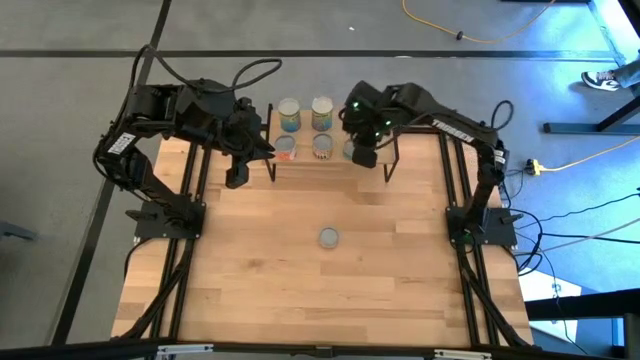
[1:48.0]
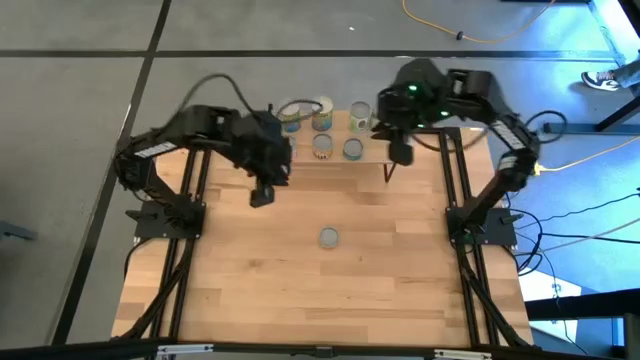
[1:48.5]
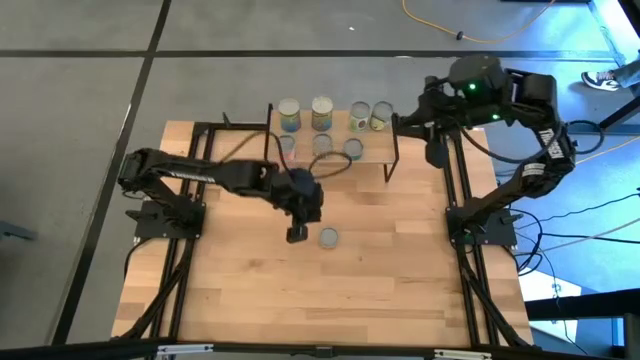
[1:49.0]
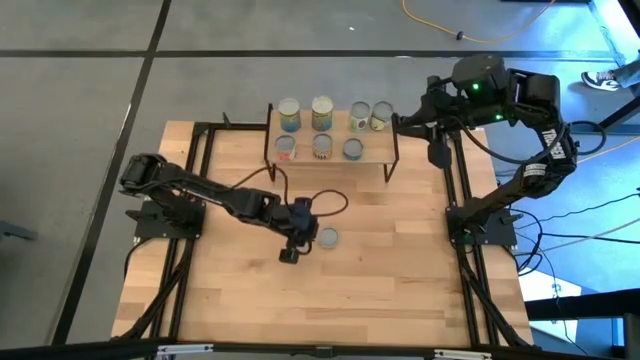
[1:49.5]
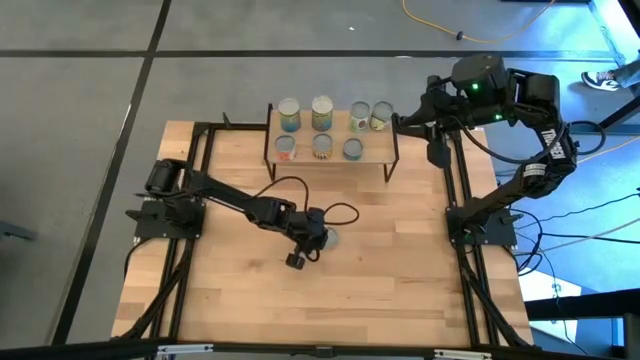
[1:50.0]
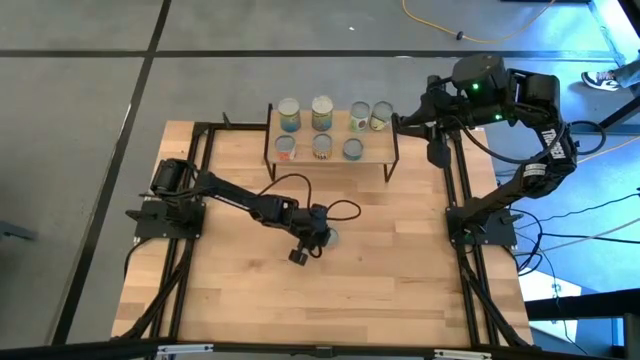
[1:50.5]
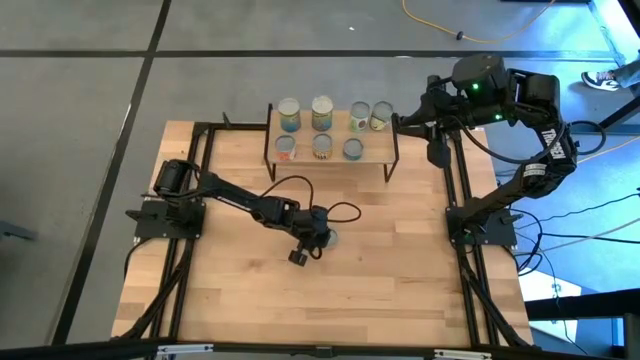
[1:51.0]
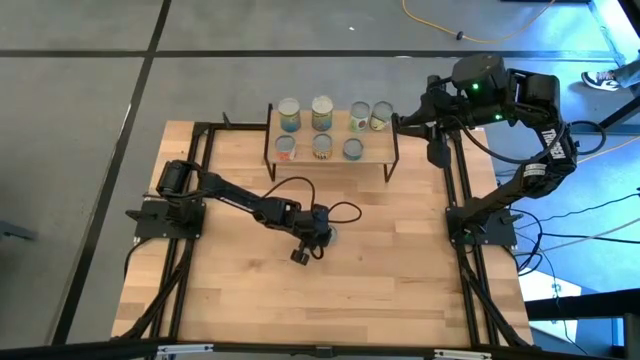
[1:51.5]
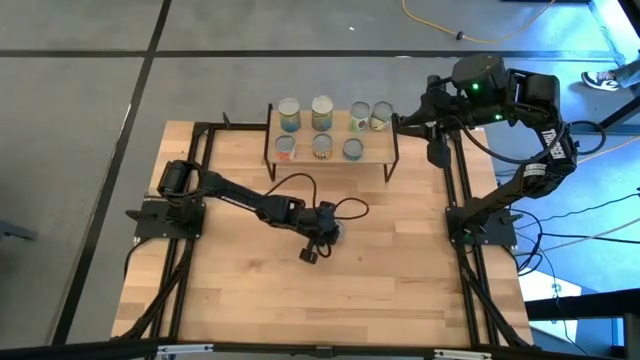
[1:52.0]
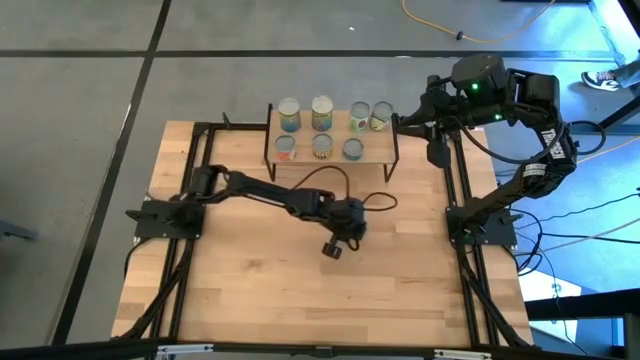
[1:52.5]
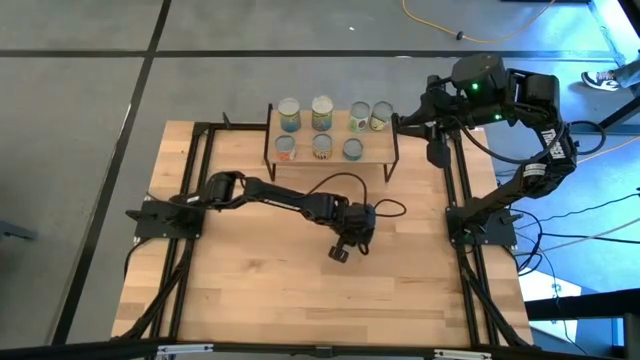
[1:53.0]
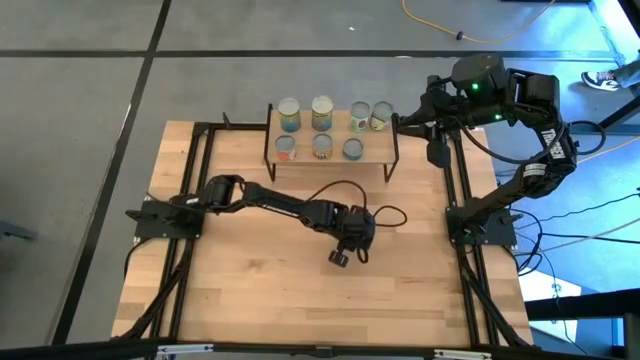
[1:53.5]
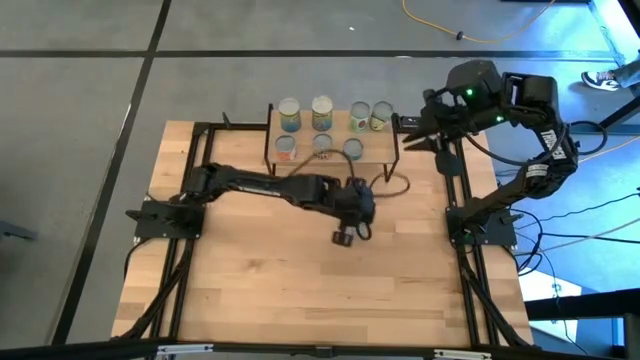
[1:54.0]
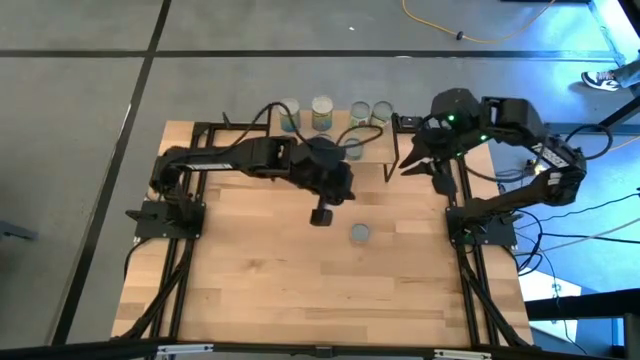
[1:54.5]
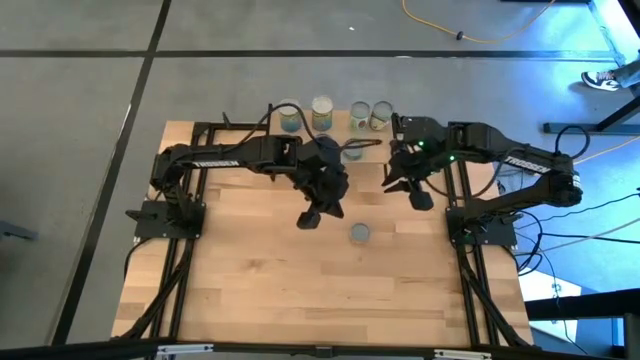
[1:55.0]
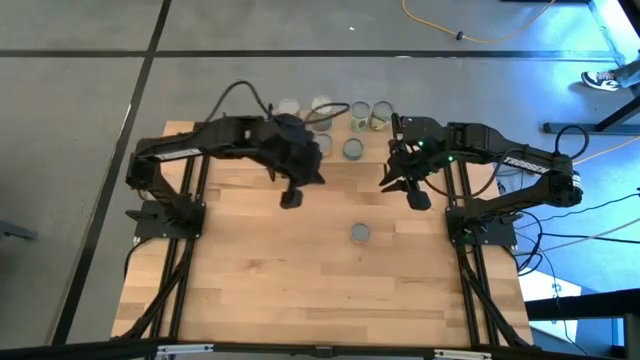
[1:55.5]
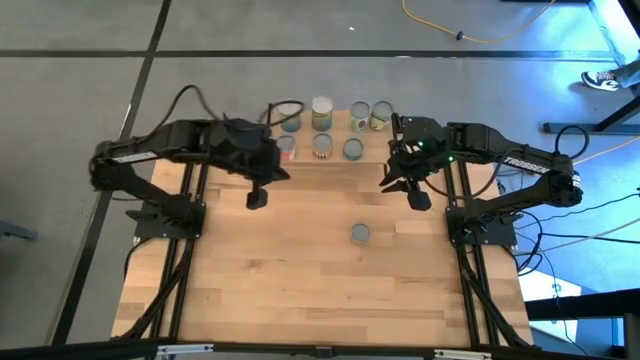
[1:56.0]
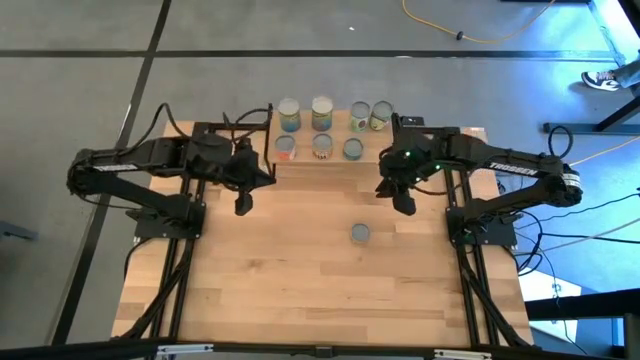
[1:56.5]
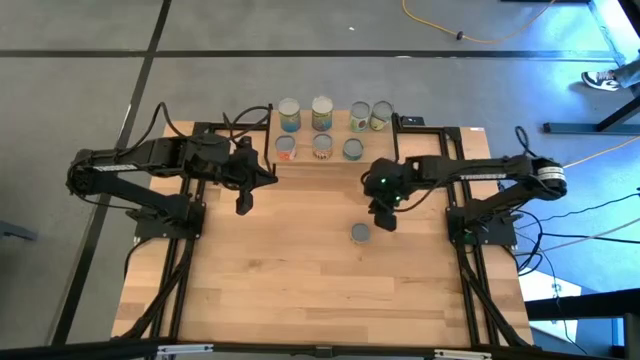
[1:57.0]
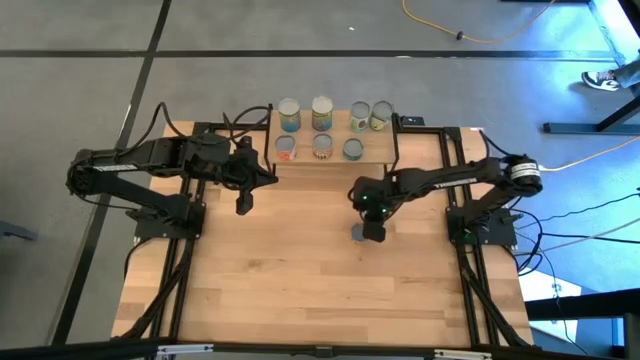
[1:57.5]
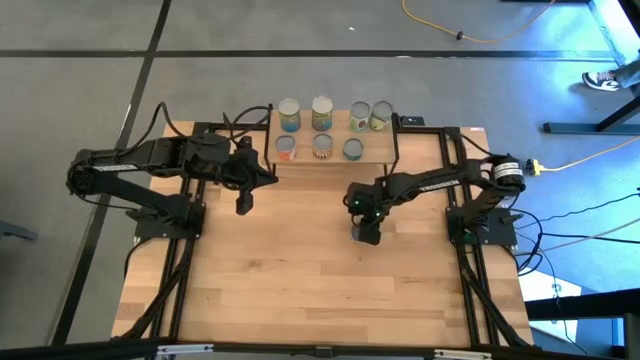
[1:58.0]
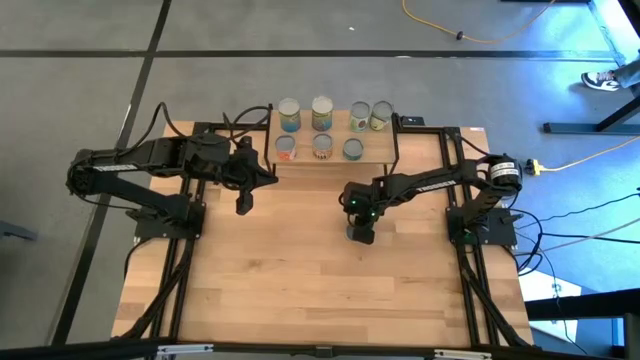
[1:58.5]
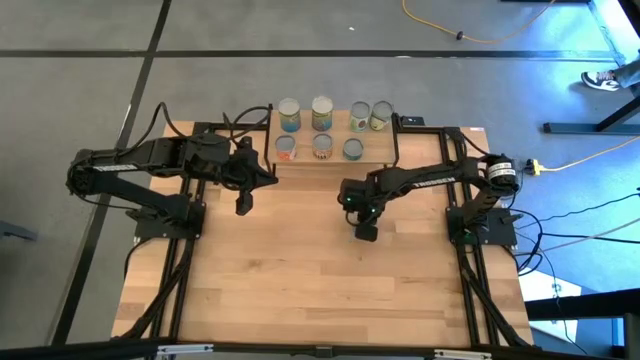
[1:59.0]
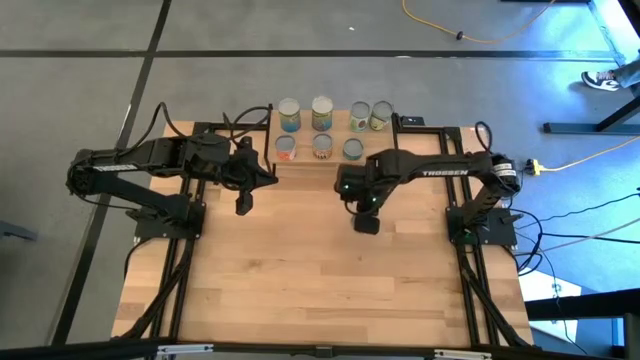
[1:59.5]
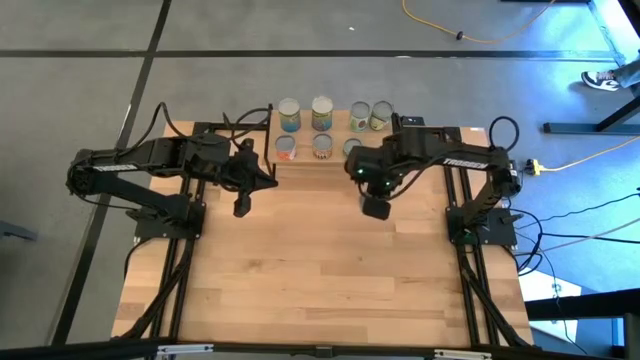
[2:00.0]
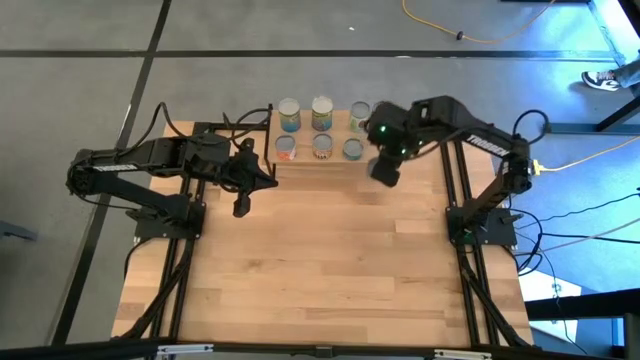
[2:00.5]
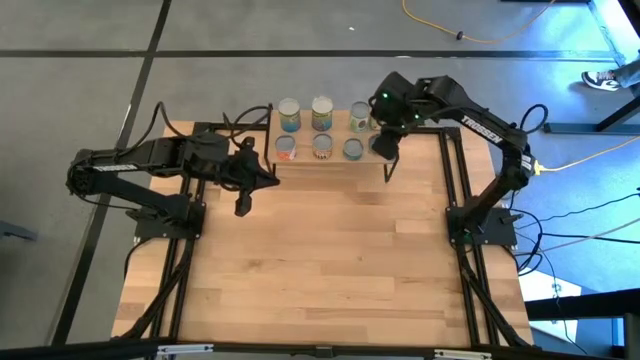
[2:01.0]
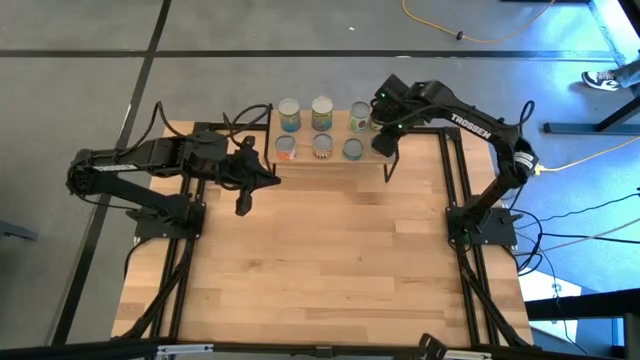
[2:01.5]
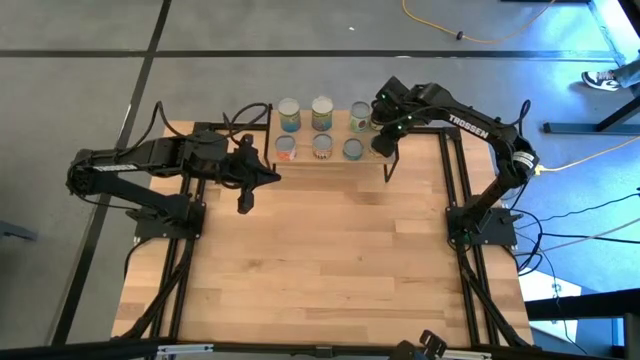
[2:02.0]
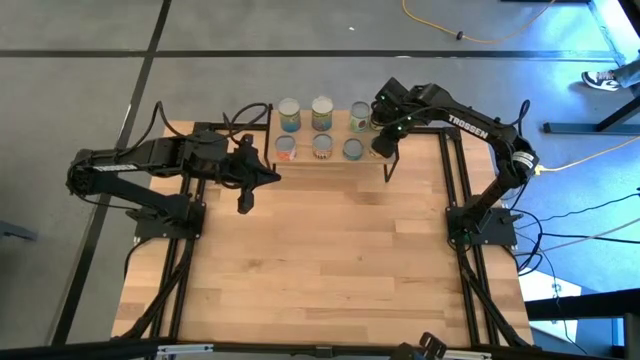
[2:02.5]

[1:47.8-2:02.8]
Task: Pick and place cans onto a shelf
Put the canned mushroom on the shelf

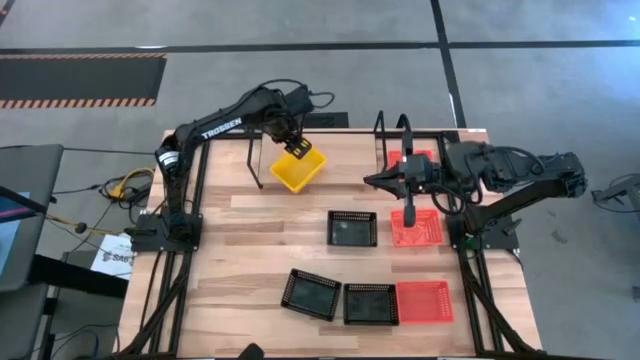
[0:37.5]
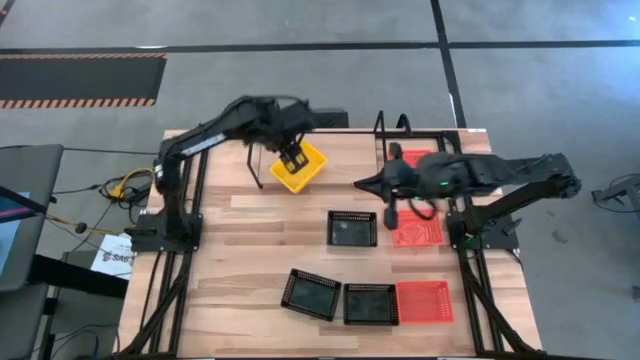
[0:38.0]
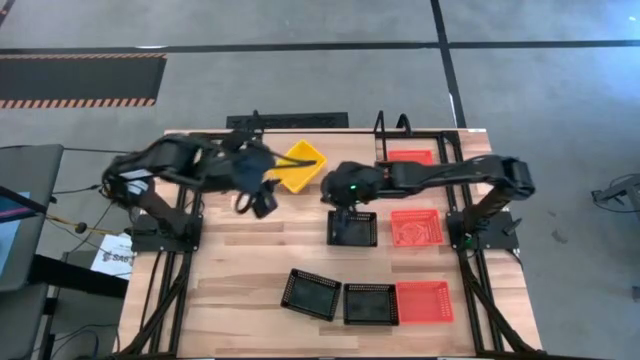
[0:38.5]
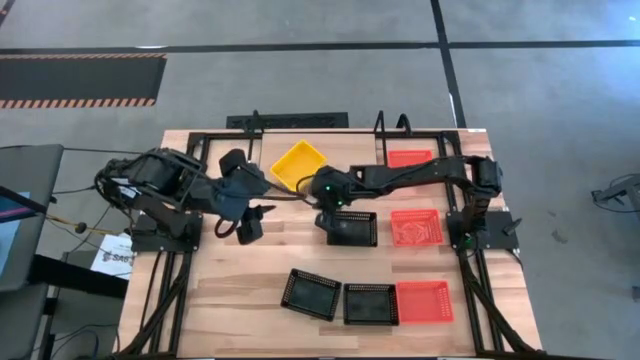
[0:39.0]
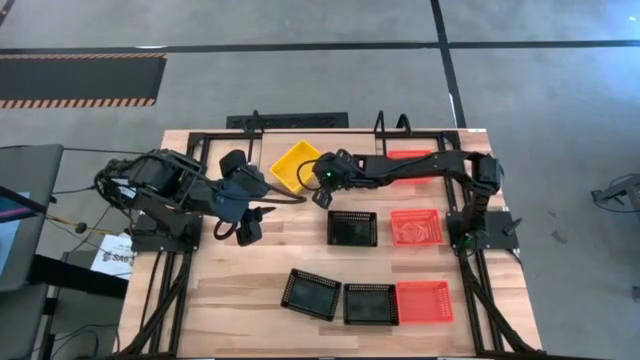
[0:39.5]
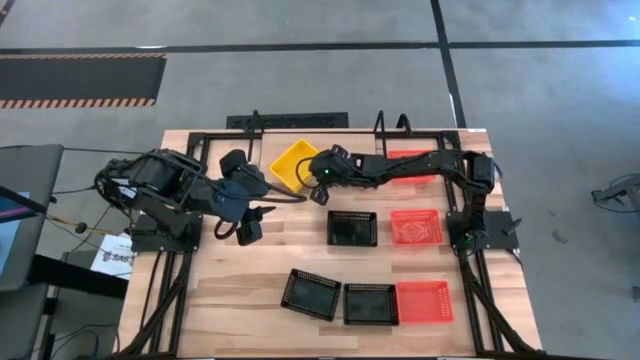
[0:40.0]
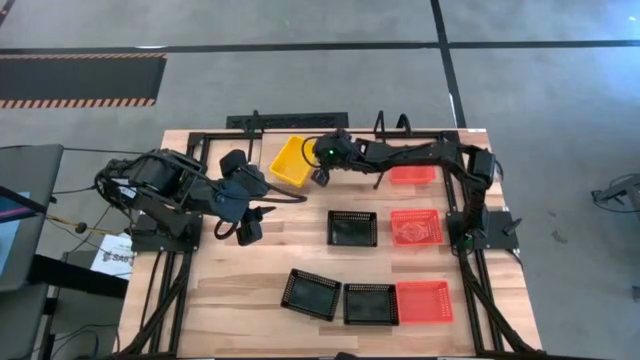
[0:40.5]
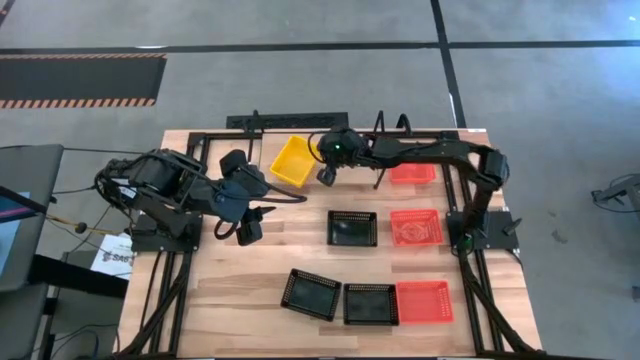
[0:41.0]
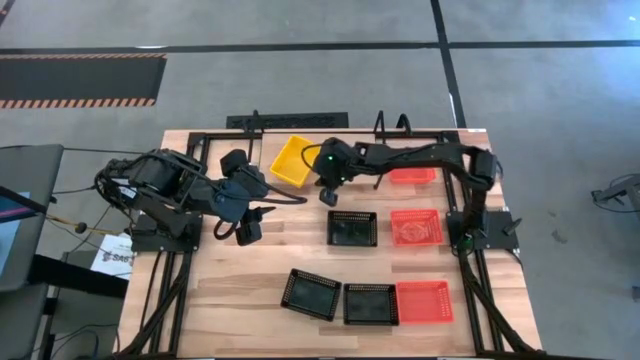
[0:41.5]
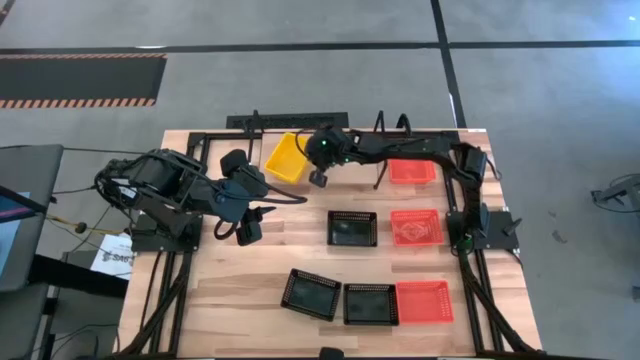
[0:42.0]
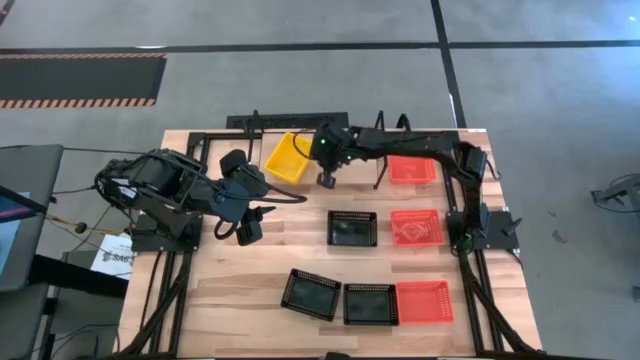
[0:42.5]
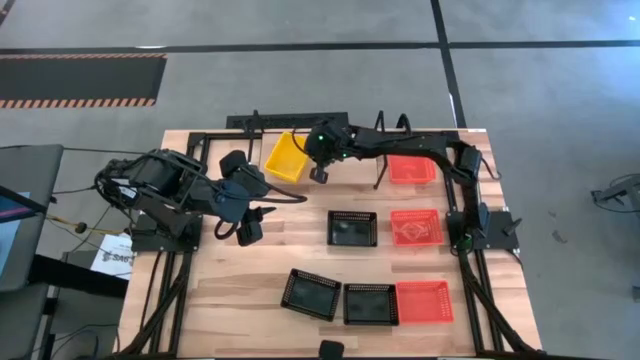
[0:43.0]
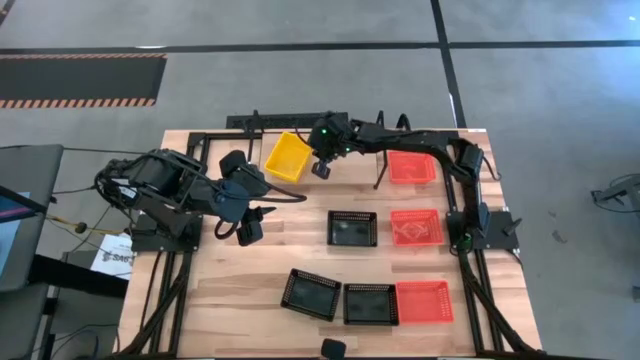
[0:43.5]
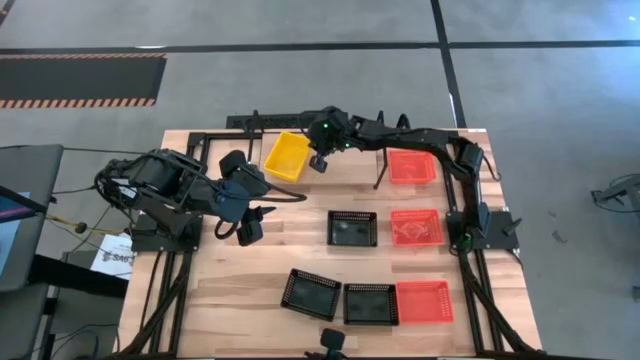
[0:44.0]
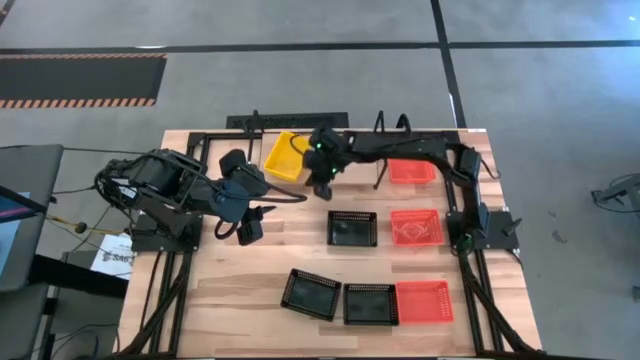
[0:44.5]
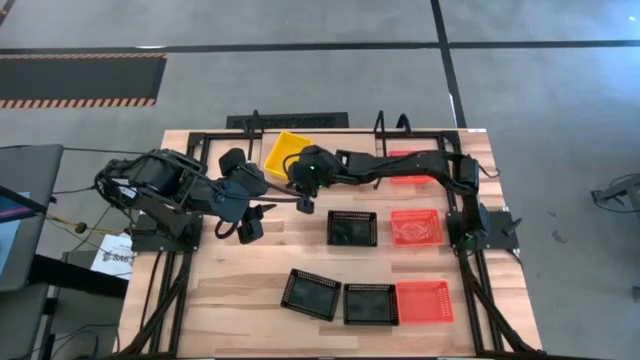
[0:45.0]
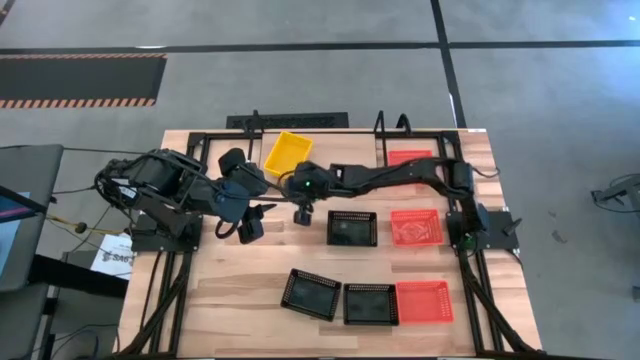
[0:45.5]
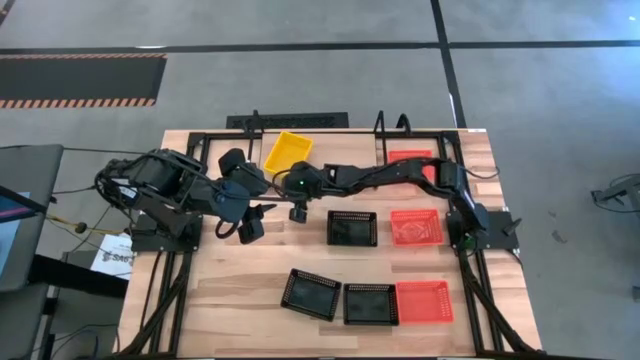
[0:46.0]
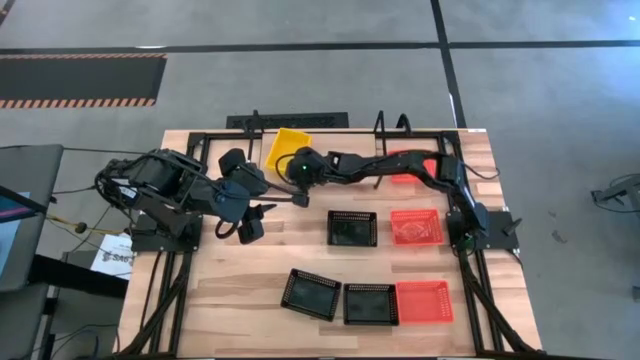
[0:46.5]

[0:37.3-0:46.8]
Task: Stack baskets on shelf by color
Move the stacked yellow bin on the left of the shelf
